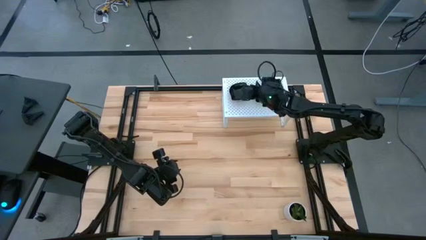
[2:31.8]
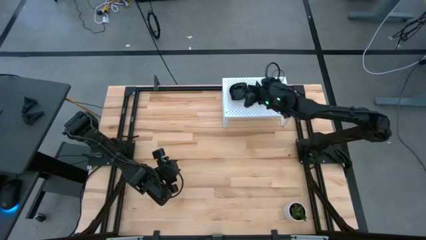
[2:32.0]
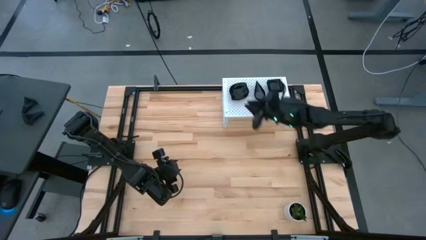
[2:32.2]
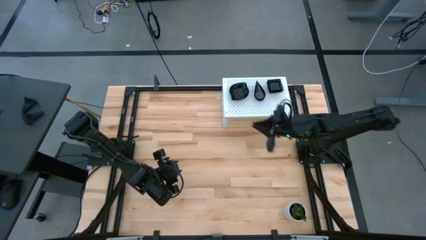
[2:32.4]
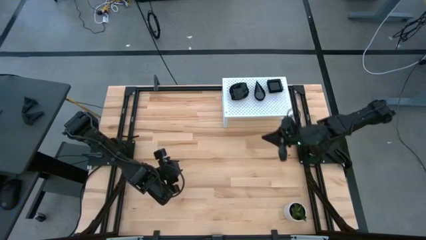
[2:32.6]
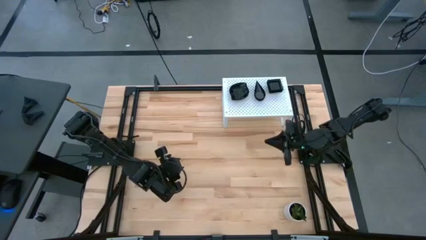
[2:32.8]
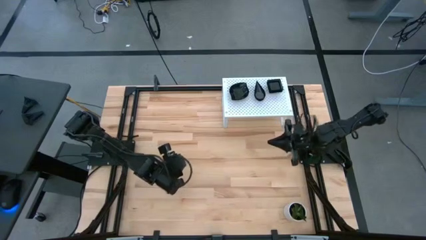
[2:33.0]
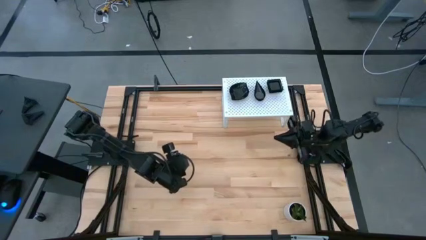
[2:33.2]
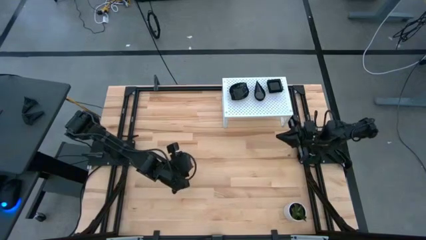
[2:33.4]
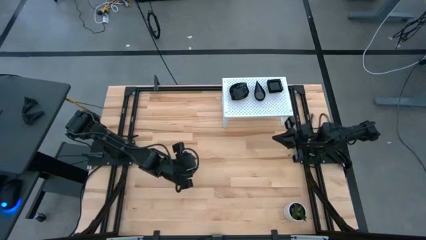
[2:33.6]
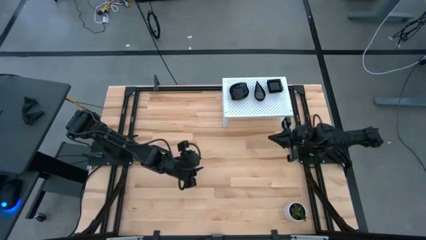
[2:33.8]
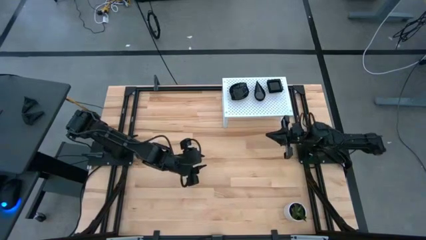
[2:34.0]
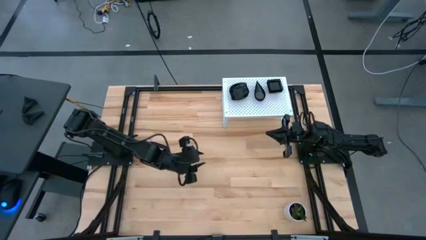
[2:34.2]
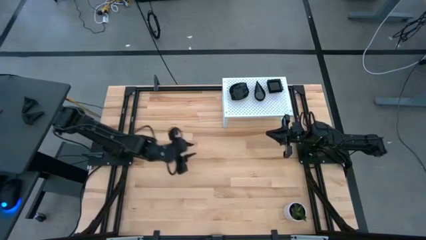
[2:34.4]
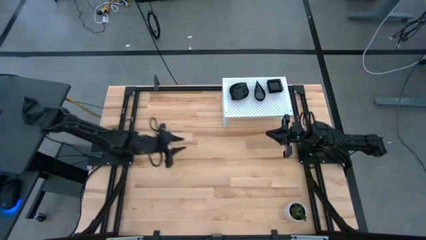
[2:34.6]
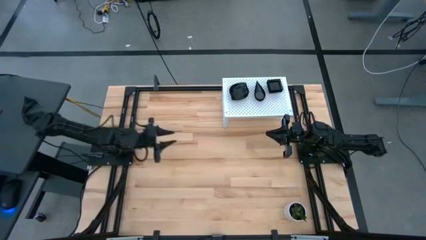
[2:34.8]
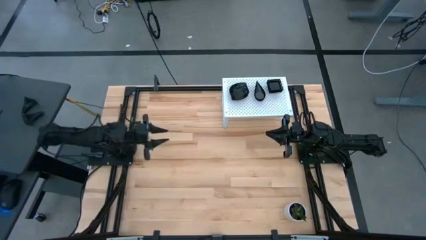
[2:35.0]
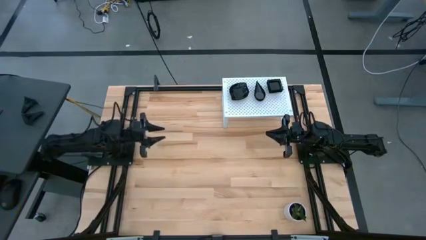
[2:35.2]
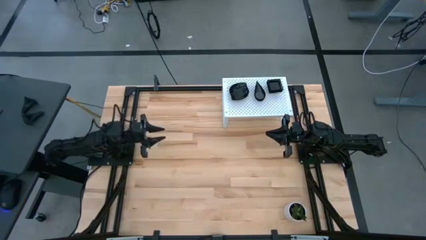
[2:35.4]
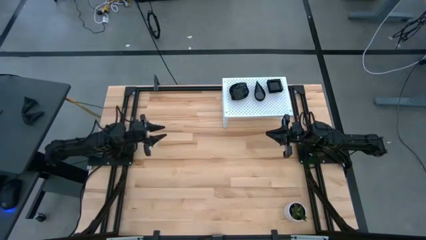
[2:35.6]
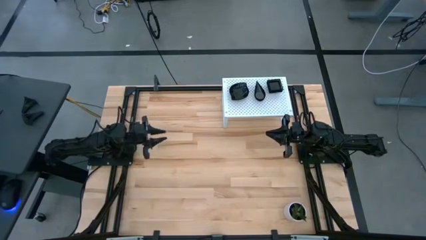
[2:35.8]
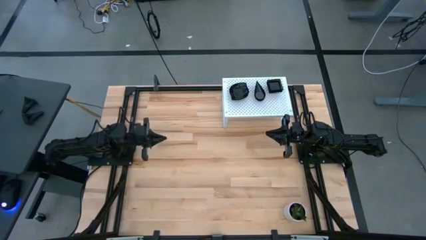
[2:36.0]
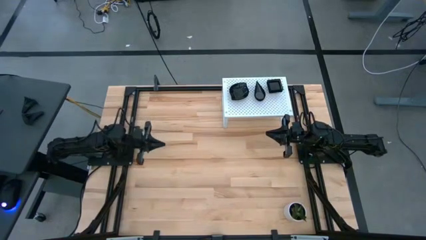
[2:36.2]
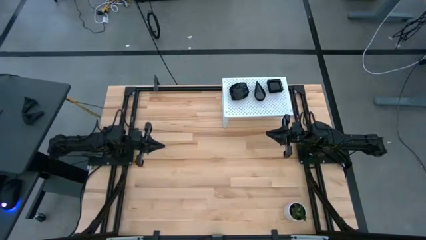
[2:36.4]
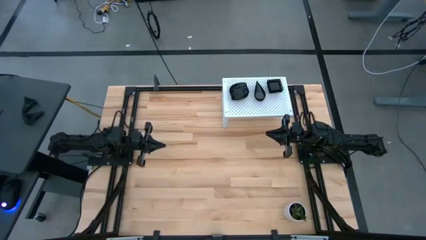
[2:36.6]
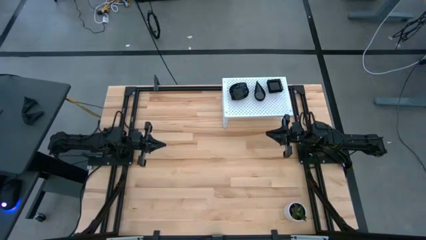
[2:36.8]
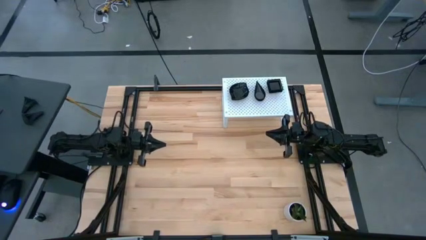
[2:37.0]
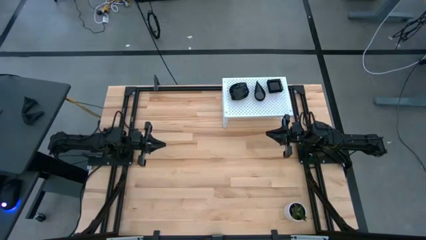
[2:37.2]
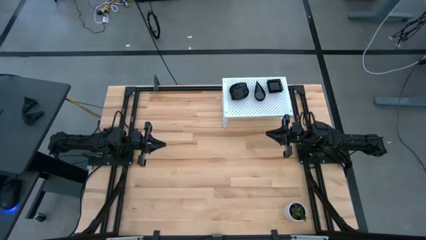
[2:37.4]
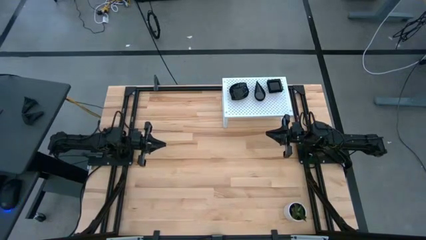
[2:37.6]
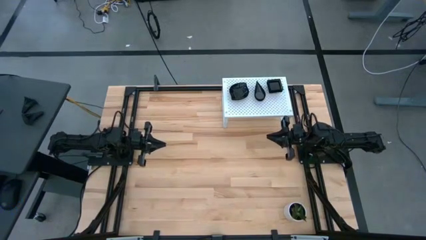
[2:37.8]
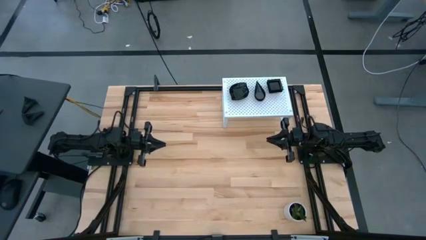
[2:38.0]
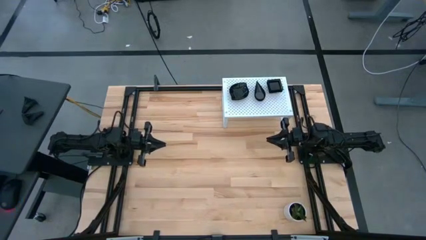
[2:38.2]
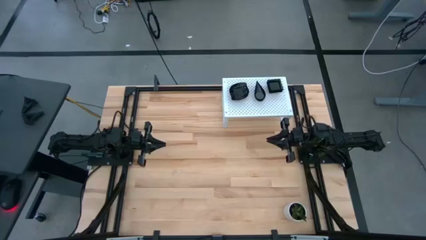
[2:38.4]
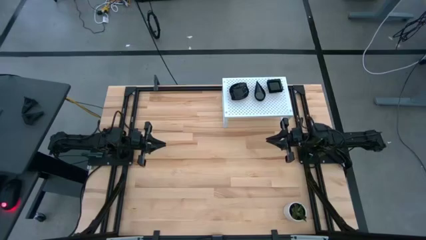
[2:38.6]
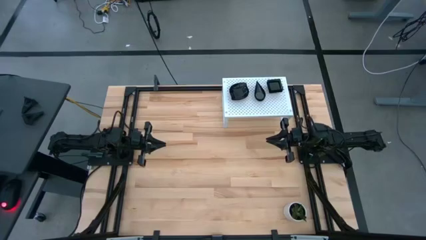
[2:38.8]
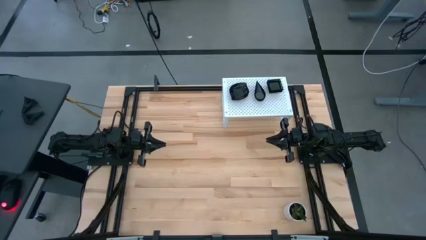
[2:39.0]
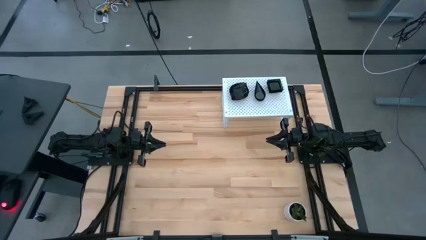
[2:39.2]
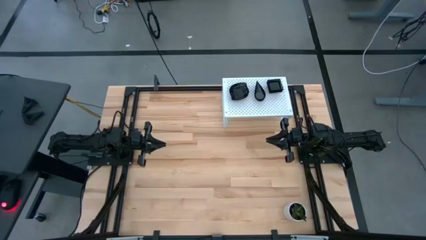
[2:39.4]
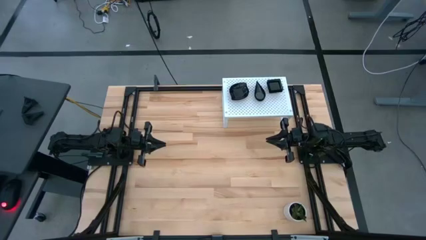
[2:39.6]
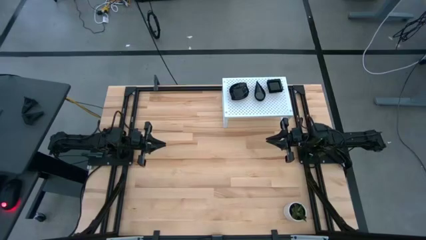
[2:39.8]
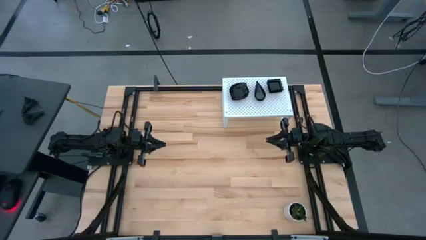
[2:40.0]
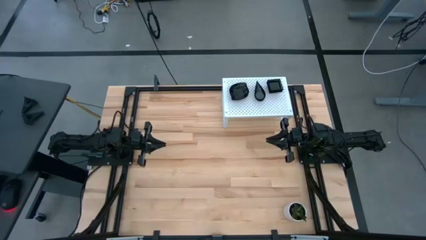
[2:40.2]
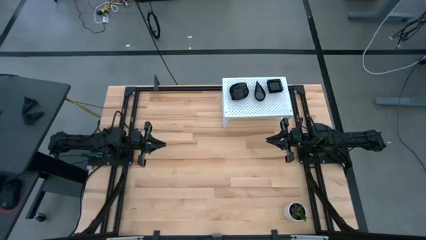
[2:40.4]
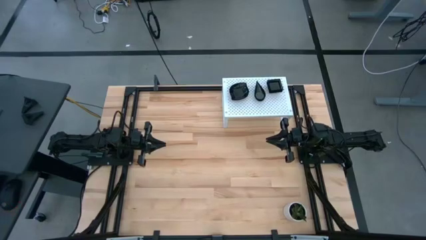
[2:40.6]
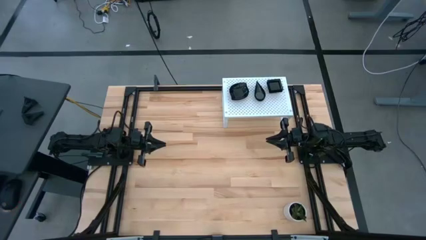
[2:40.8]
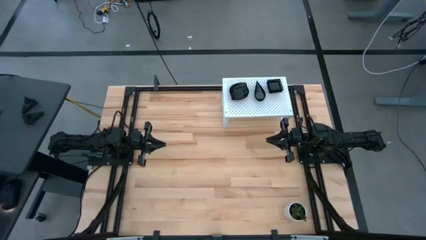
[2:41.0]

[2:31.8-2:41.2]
Task: Pick & Place Mini shaped plates
Return to Home Position
